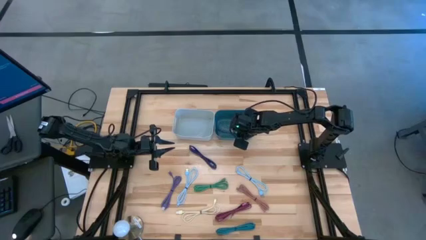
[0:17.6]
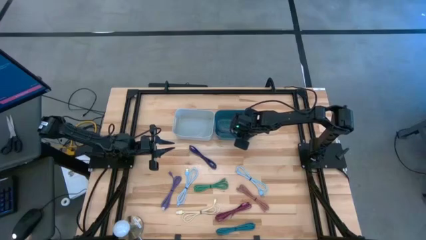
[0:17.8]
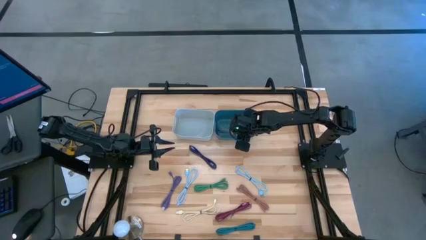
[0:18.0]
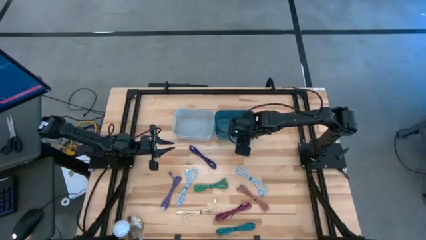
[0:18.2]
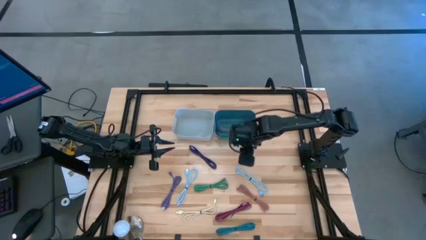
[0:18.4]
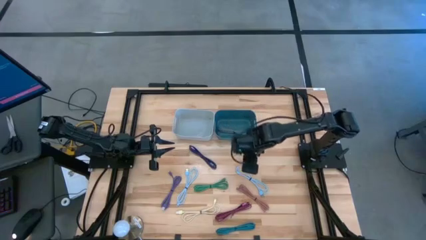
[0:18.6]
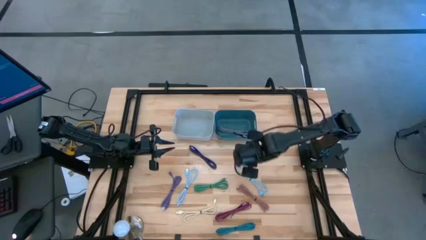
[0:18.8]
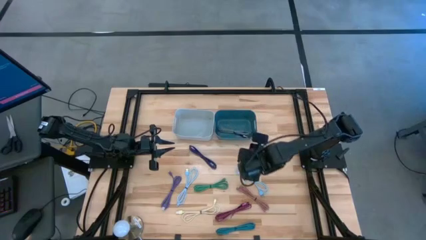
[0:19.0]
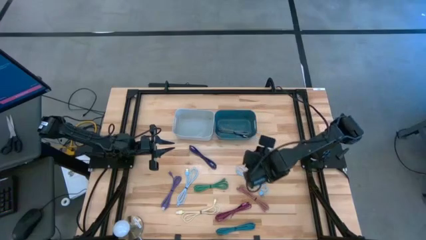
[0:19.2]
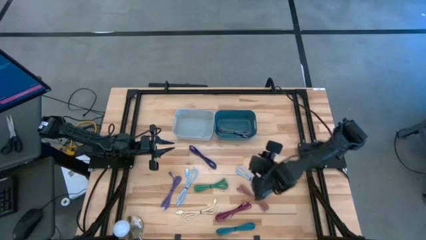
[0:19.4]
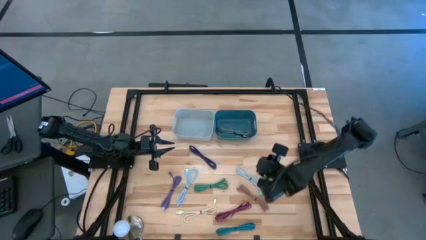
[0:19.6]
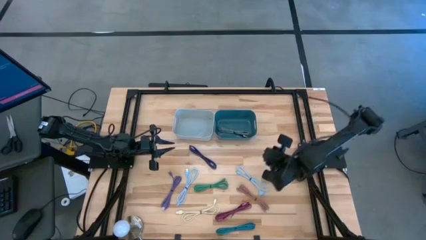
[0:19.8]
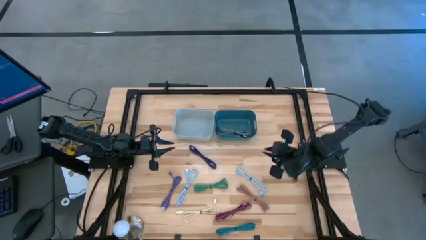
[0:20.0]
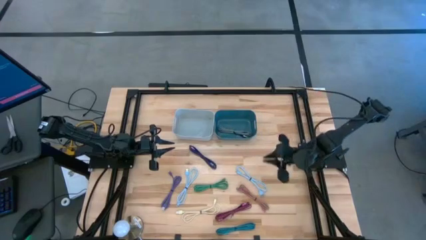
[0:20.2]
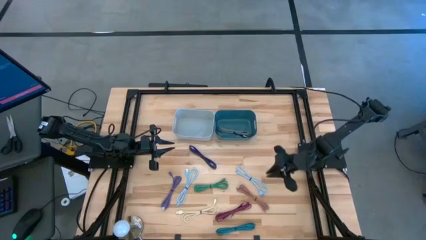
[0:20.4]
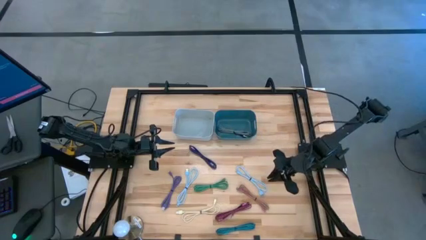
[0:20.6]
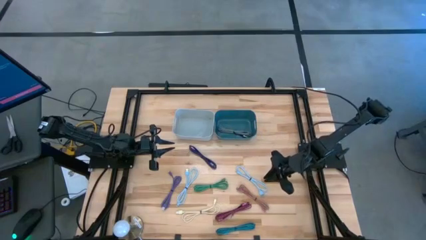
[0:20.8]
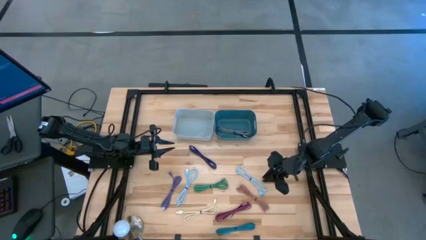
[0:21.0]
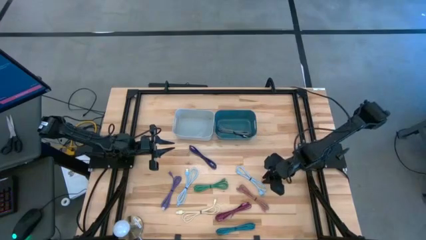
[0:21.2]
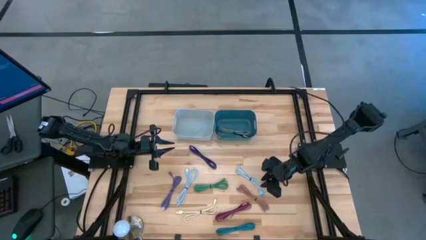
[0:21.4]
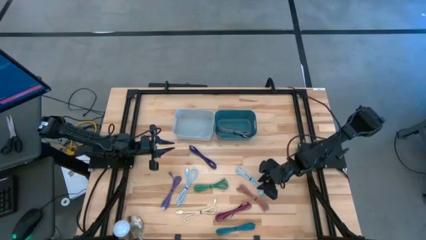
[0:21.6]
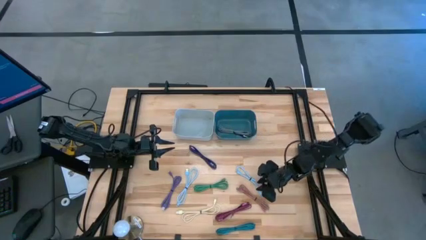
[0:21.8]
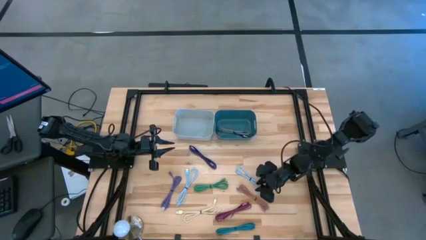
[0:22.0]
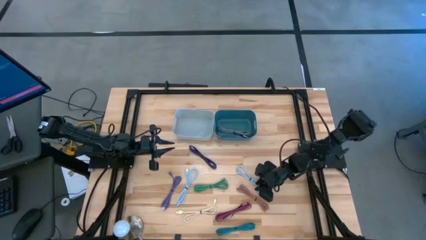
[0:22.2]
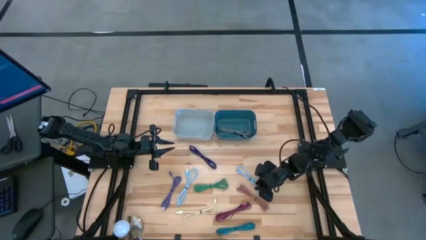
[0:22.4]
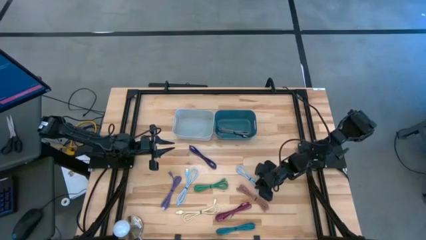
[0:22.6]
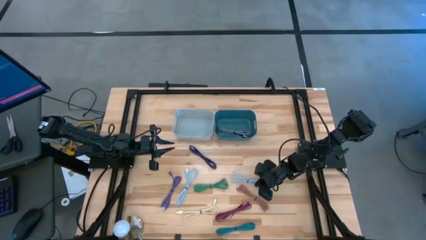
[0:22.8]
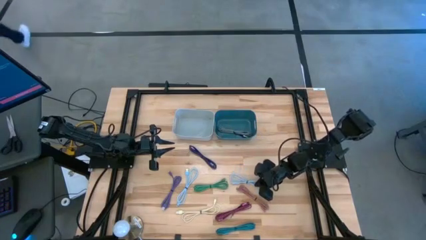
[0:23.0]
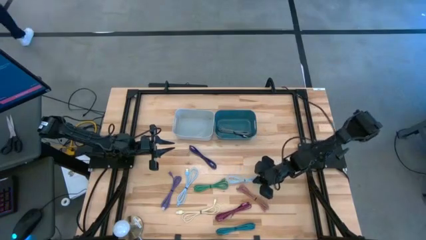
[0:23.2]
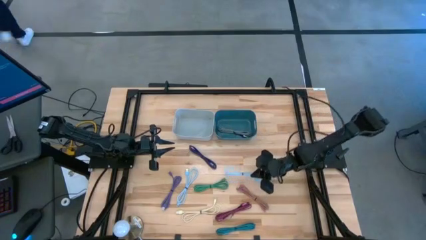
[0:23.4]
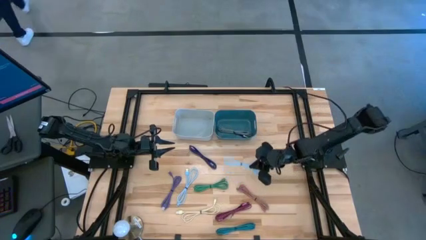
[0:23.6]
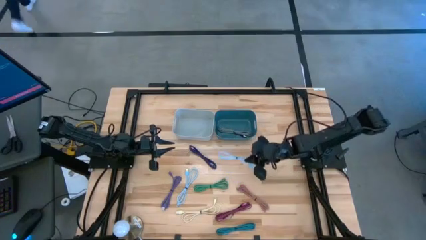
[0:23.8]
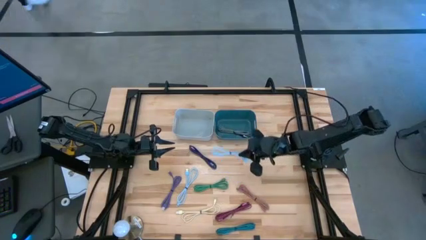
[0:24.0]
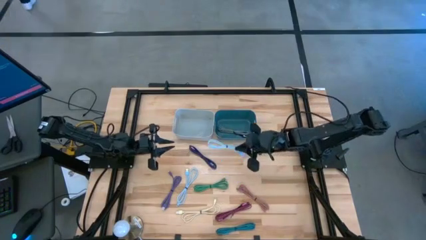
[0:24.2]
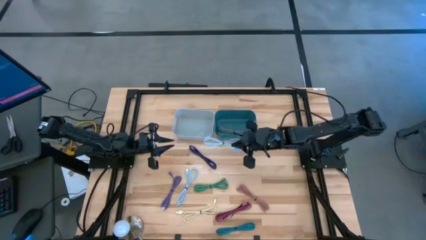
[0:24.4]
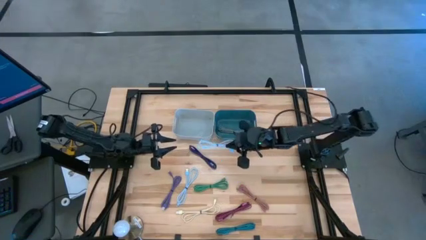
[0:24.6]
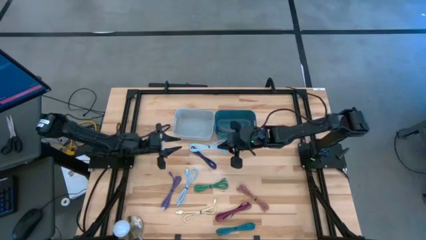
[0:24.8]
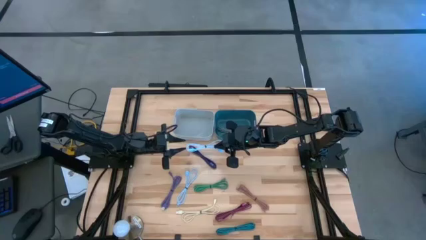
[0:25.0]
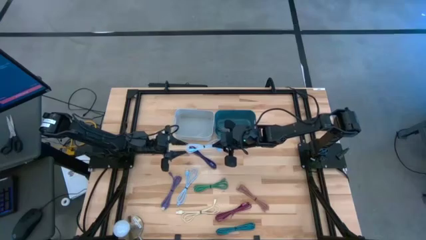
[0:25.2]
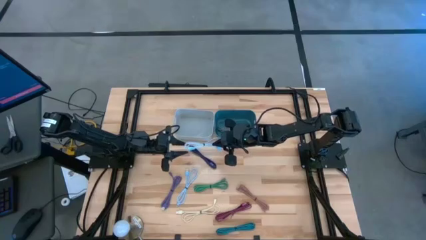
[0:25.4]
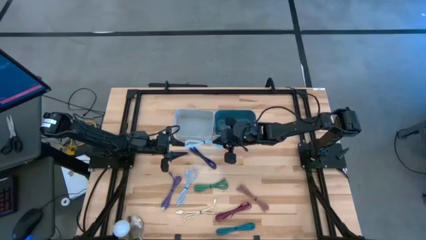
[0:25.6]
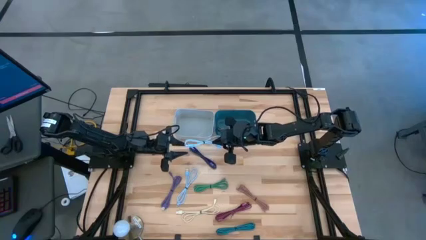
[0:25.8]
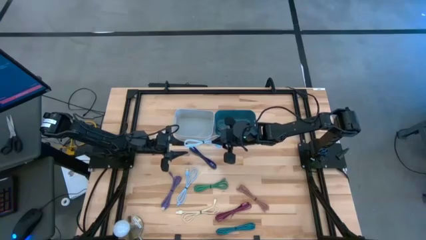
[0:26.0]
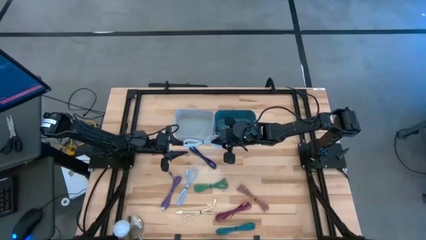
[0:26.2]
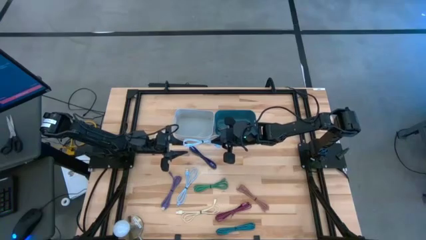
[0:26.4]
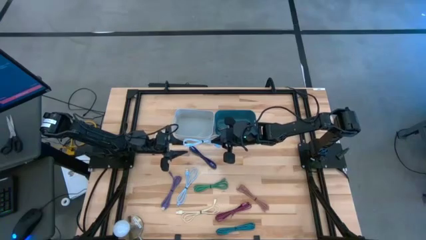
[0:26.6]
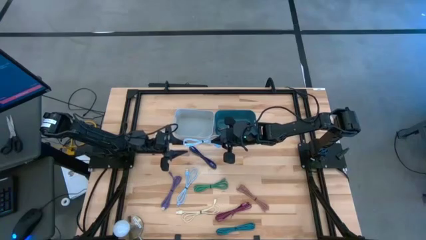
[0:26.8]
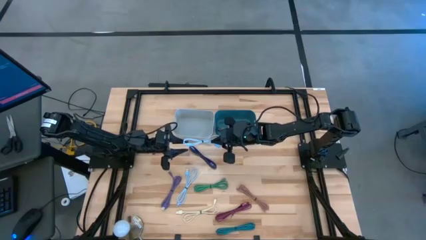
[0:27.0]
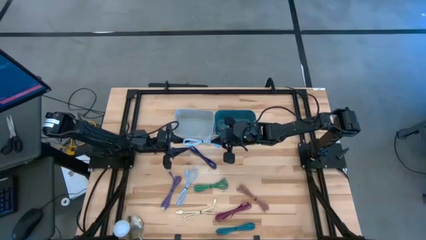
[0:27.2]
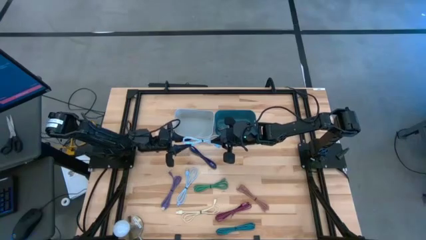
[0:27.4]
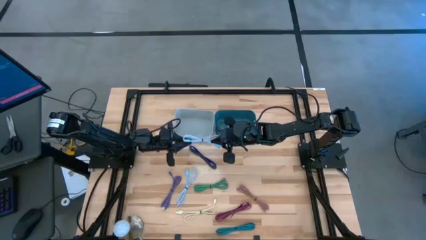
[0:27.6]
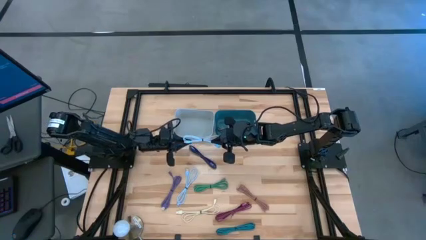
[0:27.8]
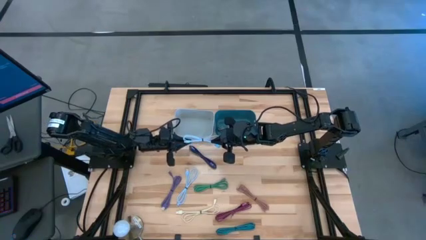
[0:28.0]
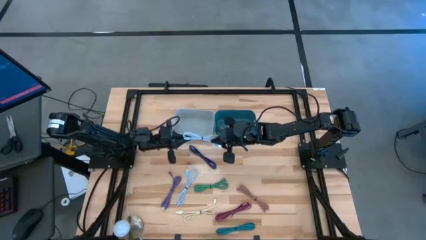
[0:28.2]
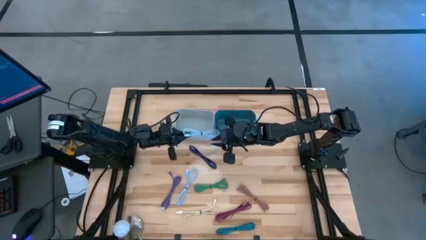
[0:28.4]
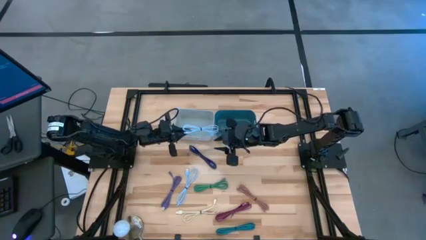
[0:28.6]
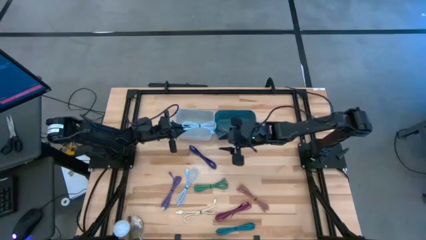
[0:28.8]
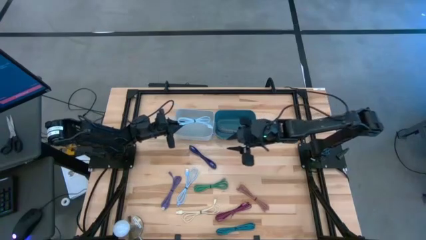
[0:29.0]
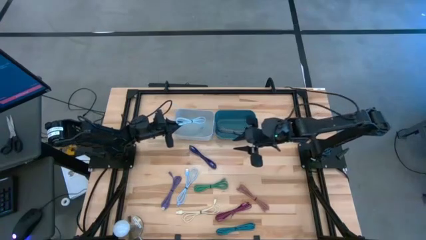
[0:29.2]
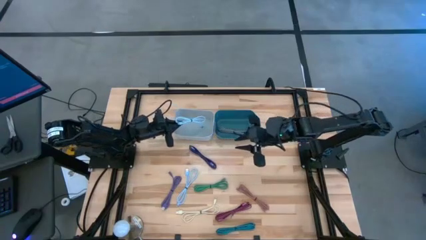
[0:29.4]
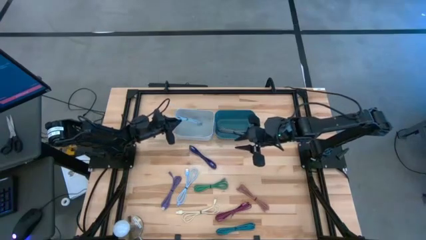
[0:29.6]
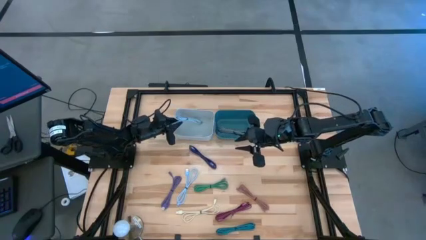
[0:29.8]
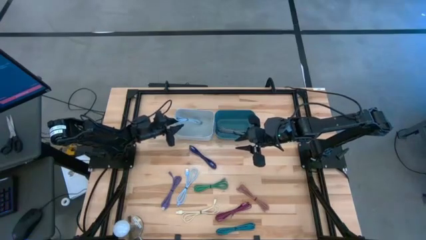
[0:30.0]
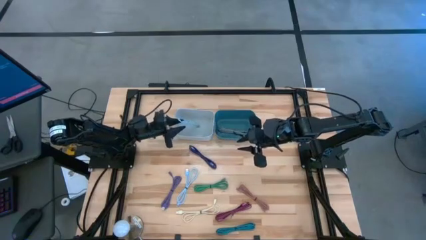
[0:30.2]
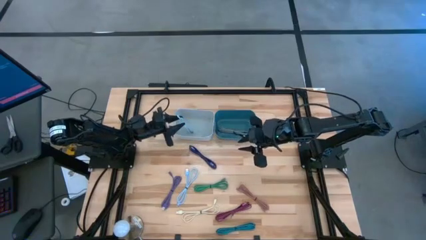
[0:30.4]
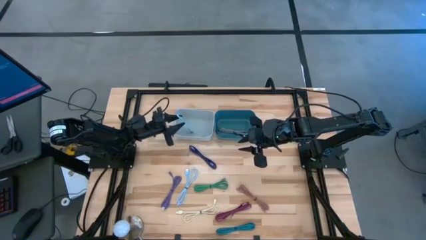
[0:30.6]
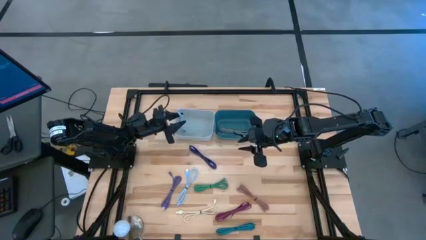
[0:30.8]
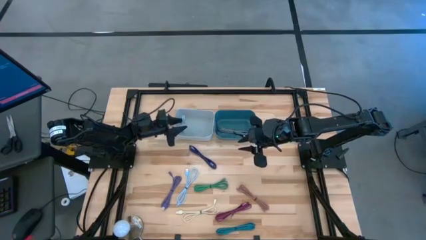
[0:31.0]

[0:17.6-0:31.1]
Task: Pick & Place USB Port
Put the right light blue charger cable into the white bin
